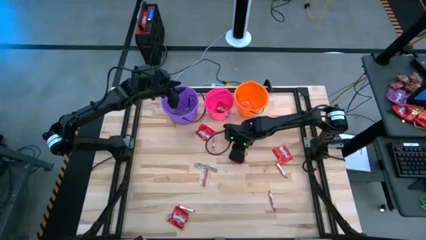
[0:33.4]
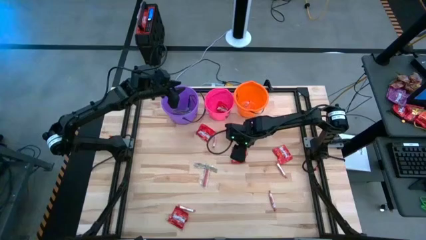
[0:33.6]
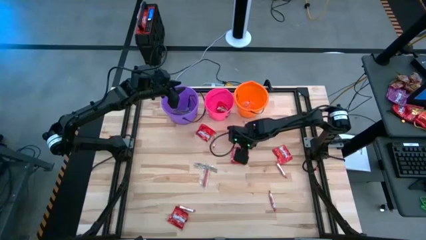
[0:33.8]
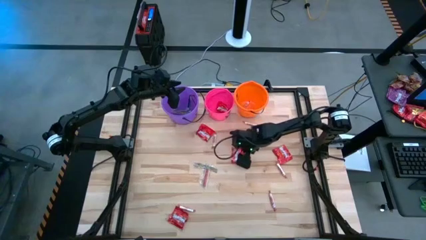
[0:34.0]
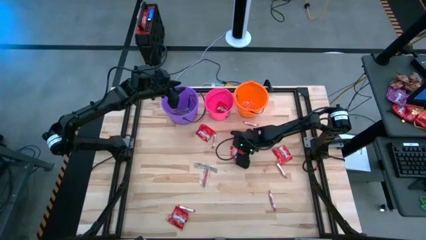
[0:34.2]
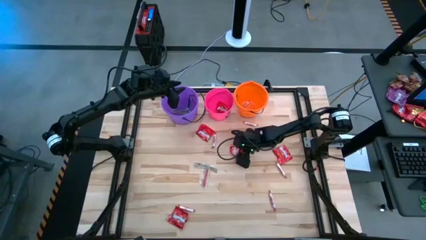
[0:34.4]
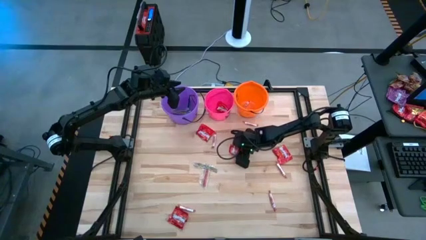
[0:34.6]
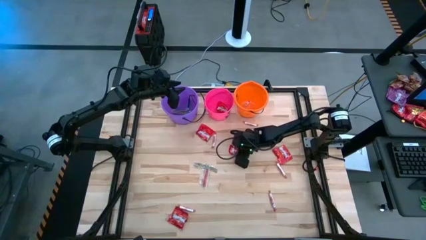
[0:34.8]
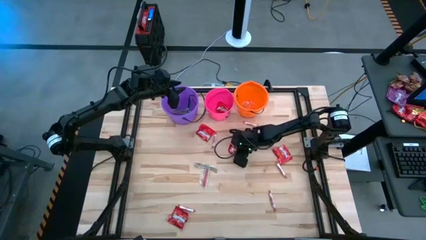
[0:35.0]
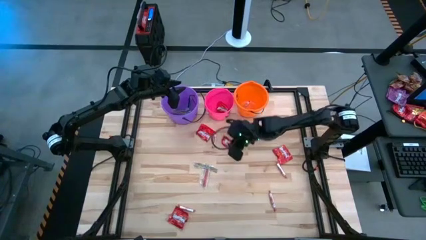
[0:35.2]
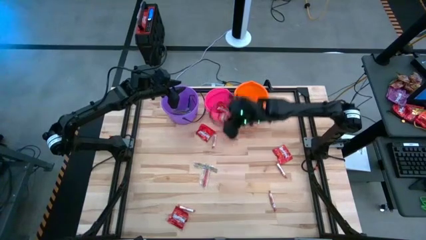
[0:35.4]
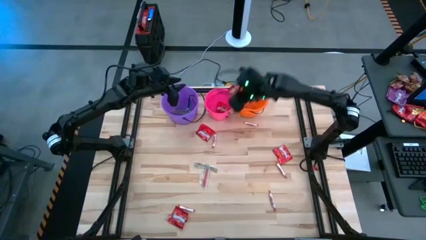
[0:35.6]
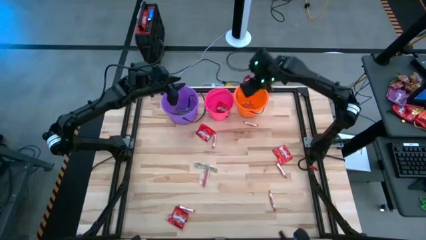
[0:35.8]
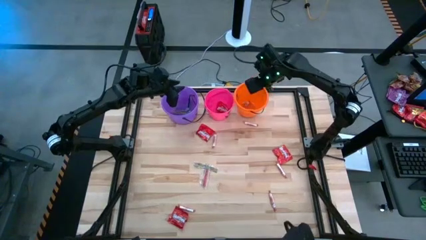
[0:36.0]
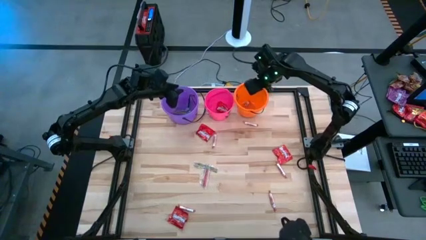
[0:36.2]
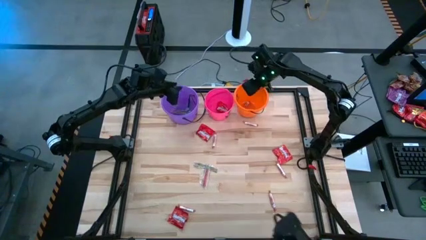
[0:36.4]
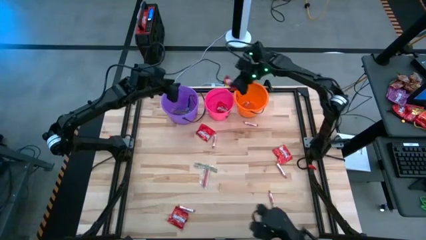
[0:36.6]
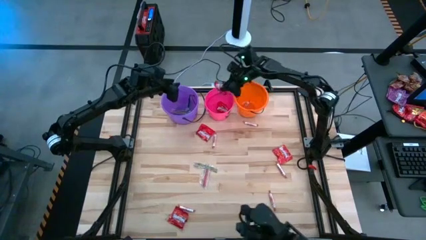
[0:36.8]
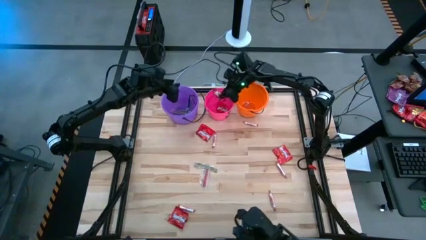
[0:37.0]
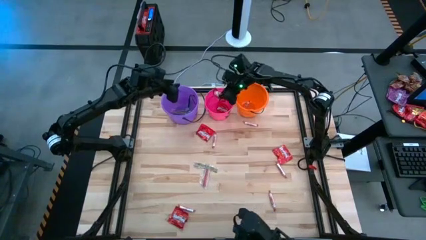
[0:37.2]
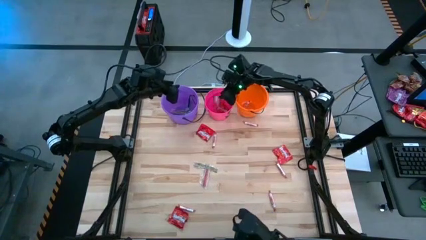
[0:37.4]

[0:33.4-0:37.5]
Task: Sort candy by brand, put in halloween buckets
Put the red candy pack into the pink bucket

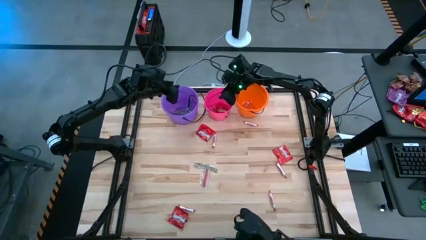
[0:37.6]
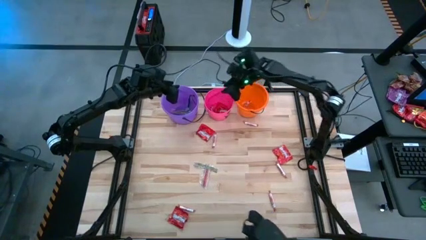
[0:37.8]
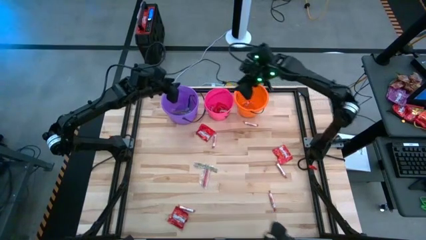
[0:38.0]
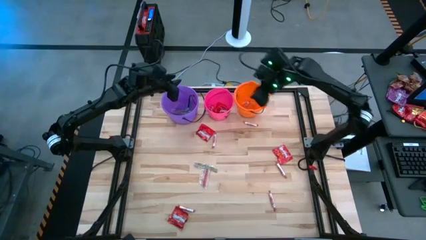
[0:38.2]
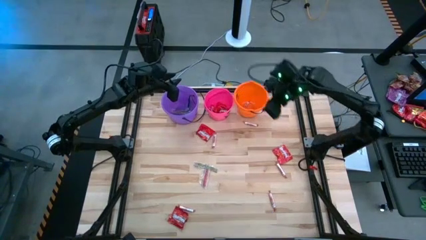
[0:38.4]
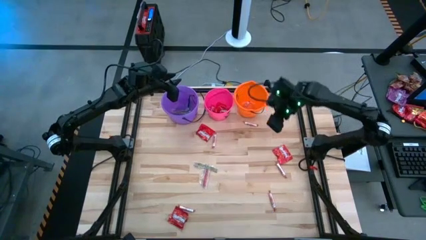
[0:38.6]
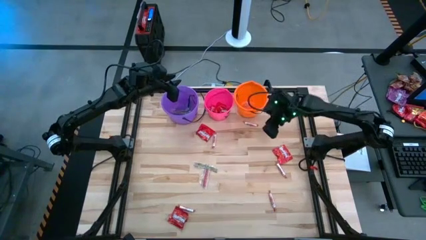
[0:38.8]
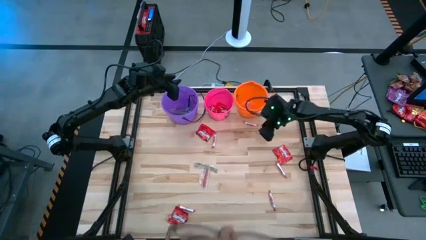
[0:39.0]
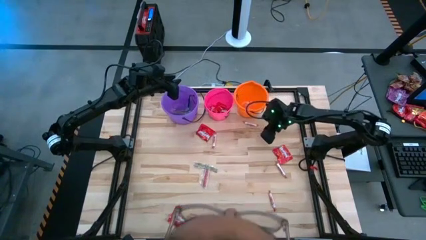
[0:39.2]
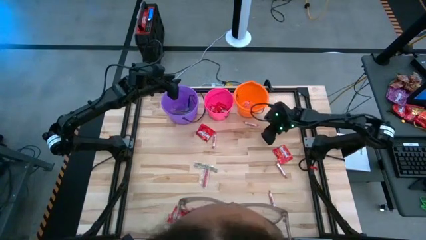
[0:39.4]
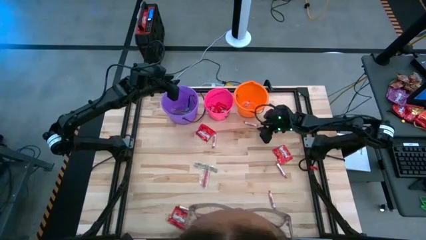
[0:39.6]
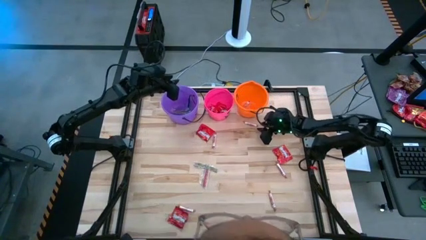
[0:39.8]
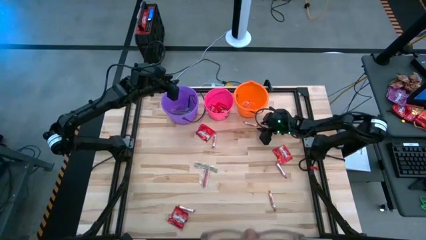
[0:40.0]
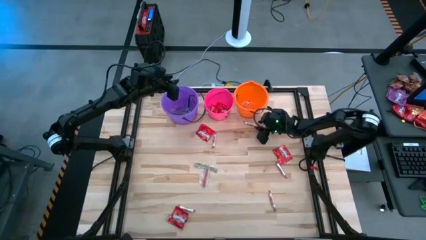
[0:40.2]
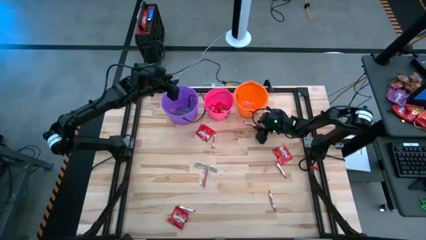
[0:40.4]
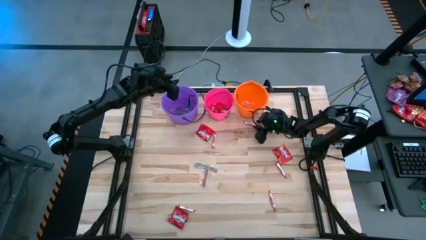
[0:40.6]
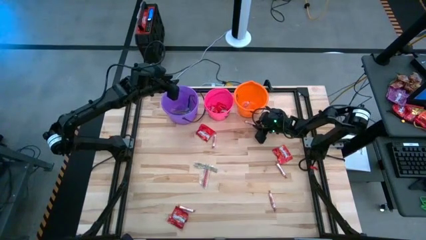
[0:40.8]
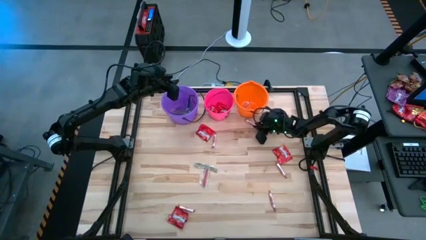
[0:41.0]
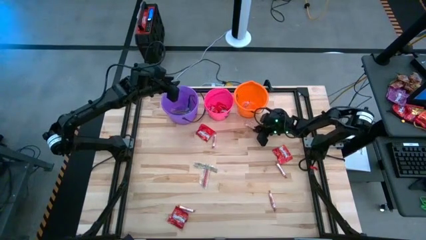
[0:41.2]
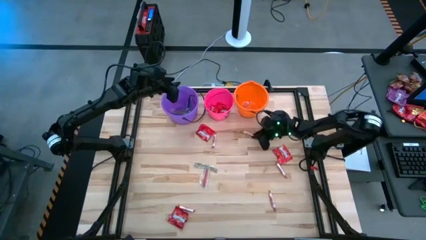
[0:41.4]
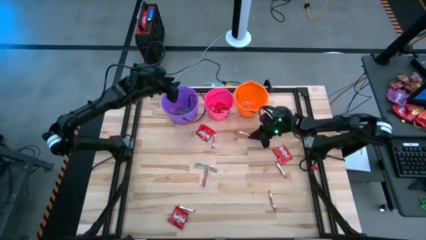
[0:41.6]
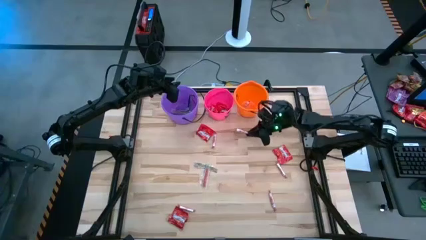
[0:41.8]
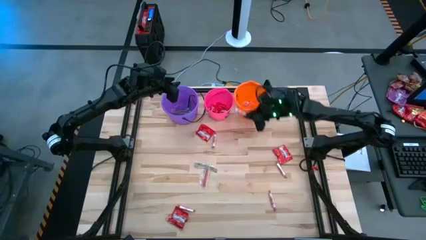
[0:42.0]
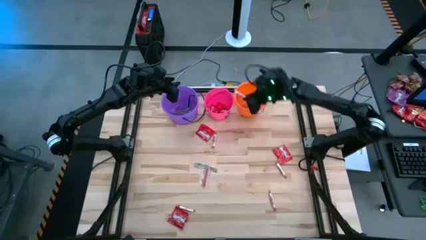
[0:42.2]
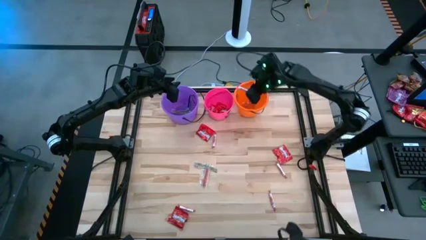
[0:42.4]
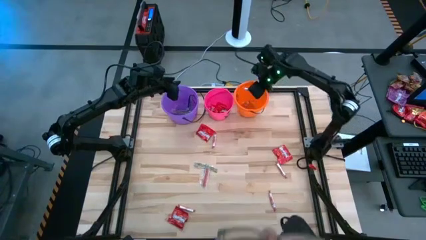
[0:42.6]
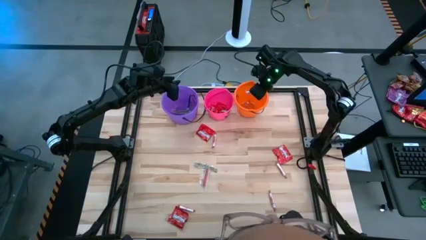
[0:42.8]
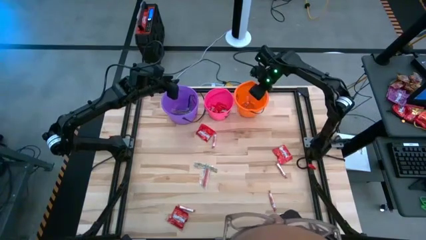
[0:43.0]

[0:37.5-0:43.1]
Put the transparent candy roll into the orange bucket

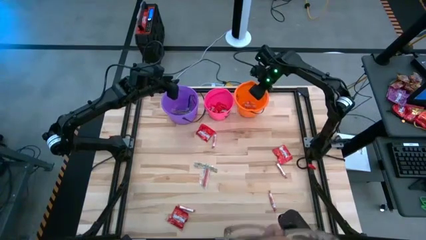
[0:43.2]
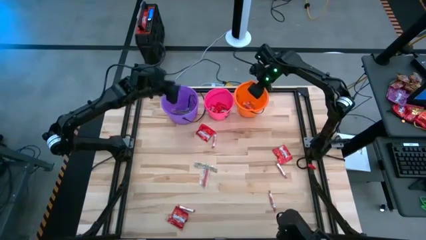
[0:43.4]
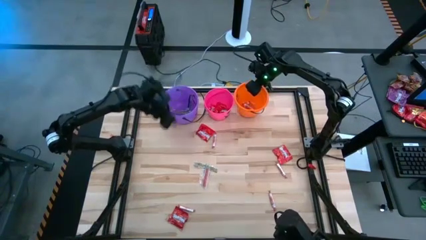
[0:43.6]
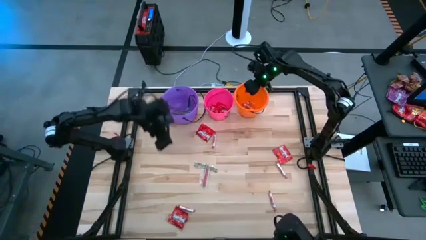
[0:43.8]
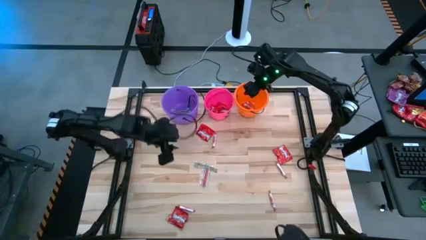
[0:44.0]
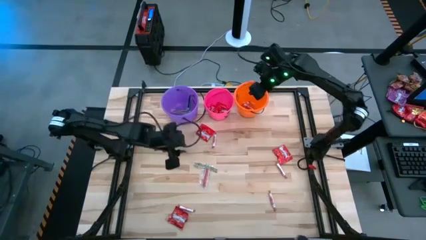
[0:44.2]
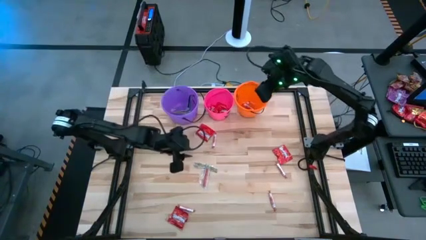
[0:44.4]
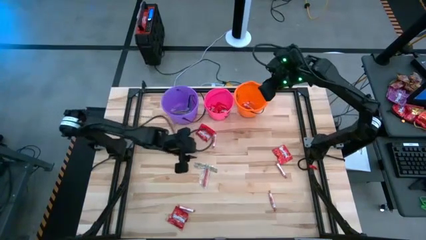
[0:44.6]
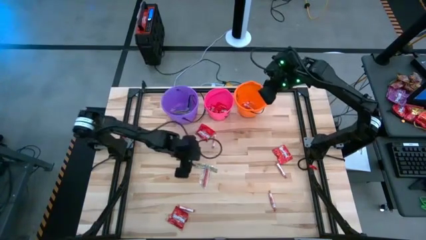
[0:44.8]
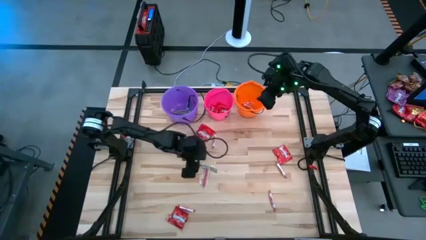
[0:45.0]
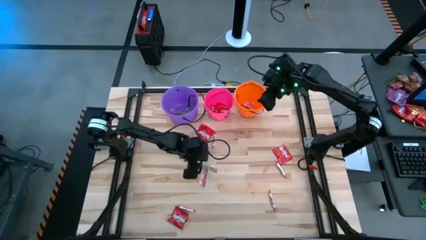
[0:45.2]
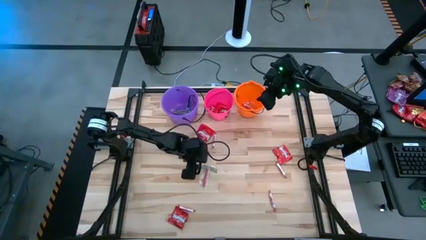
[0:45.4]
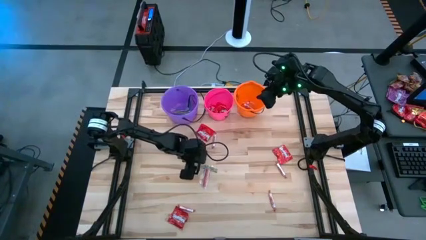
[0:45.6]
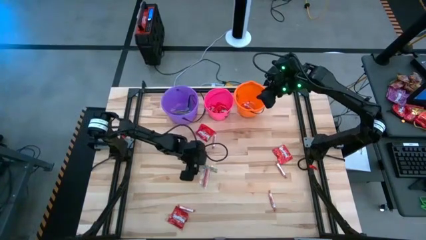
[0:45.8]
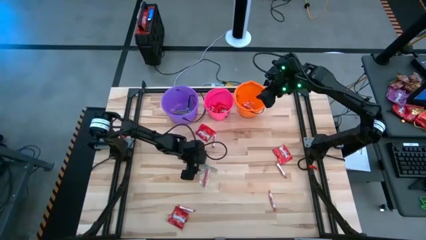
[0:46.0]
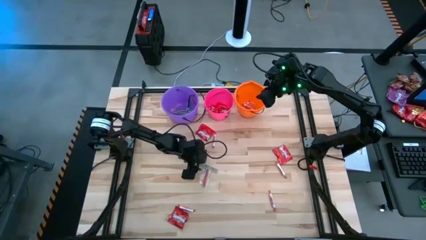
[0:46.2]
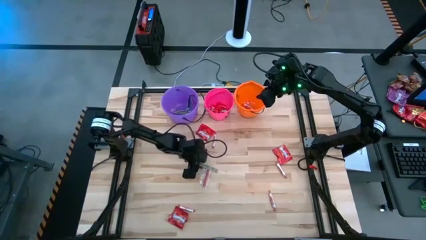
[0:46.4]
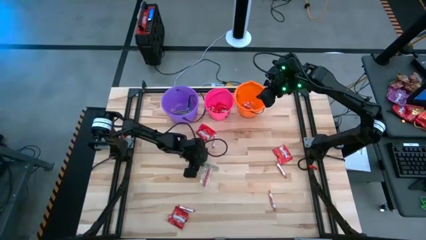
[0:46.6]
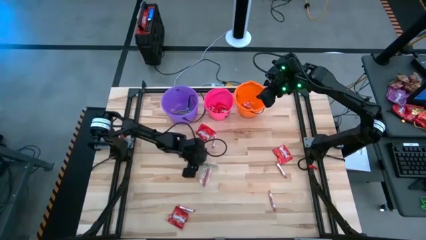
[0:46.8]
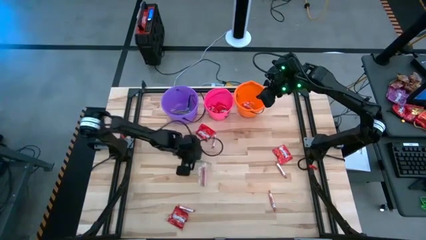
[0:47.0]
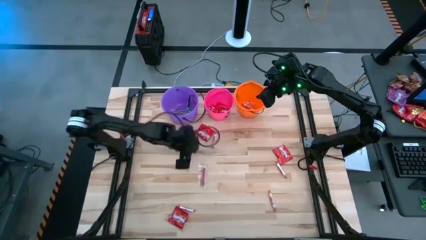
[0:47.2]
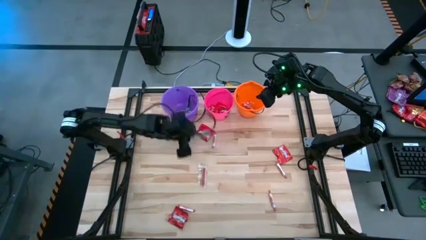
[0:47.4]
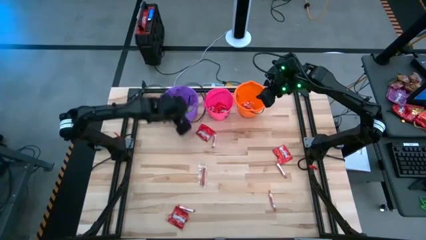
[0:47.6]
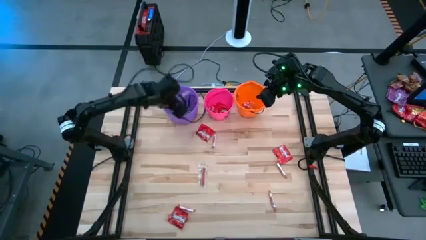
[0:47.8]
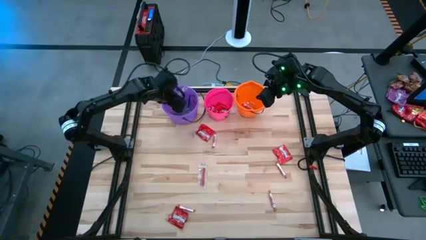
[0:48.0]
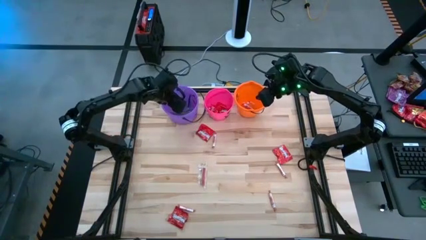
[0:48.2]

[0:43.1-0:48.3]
Put the green candy into the purple bucket

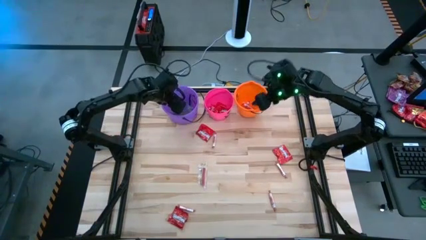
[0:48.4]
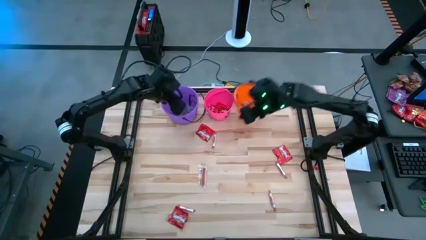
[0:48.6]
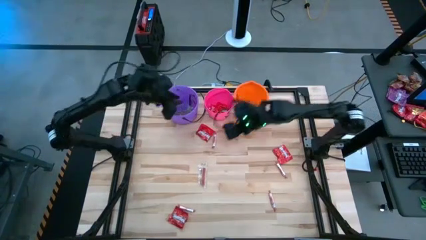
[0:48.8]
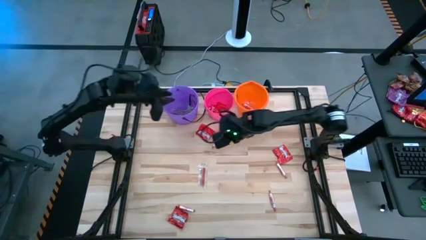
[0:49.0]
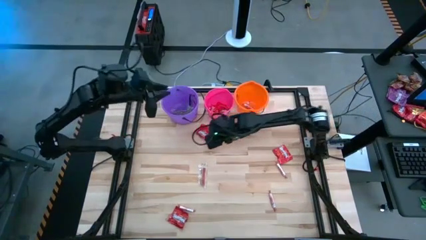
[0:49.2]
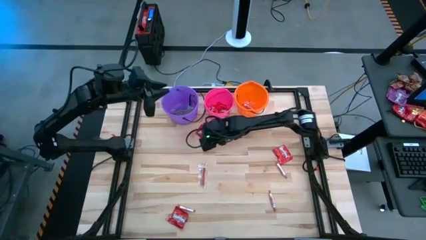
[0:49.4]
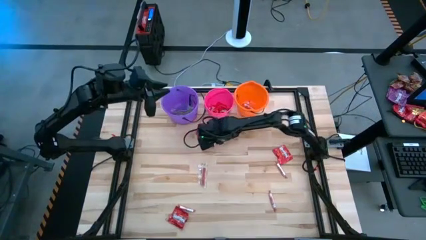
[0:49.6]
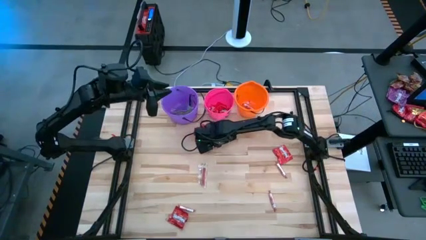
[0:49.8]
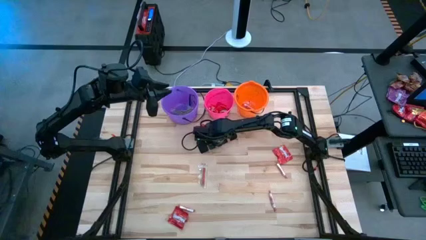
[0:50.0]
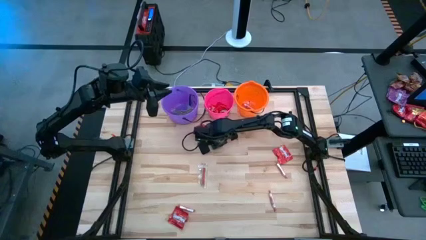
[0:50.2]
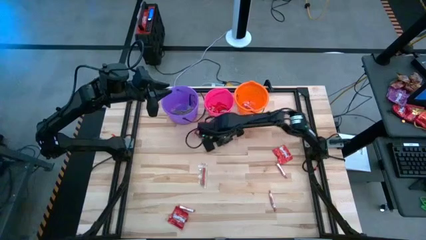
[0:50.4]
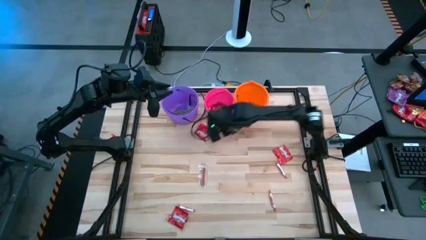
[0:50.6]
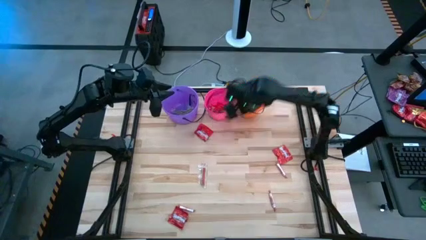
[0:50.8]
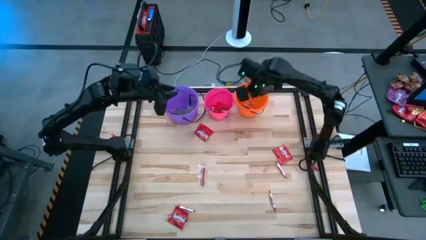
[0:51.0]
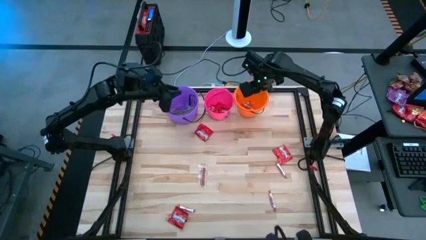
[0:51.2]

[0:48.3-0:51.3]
Put the transparent candy roll into the orange bucket
